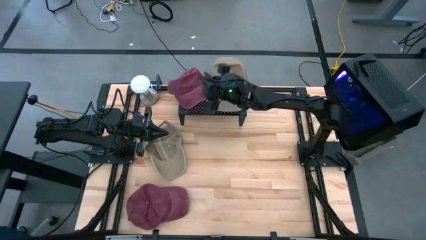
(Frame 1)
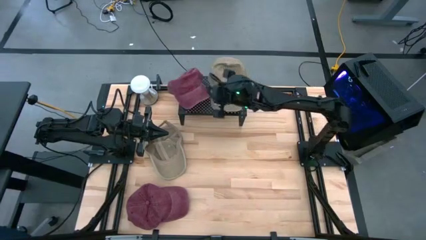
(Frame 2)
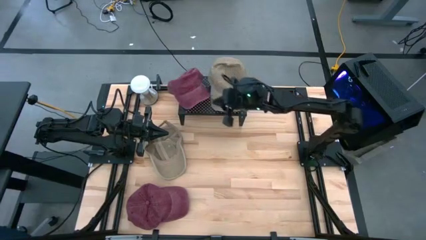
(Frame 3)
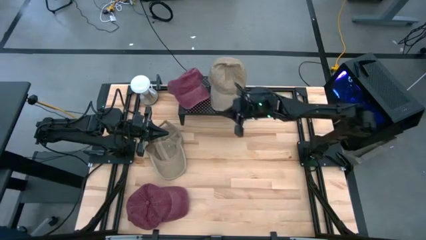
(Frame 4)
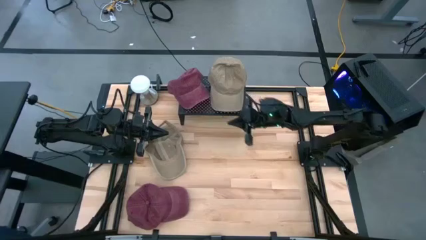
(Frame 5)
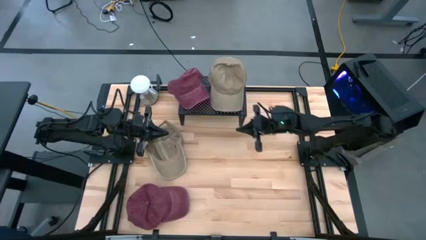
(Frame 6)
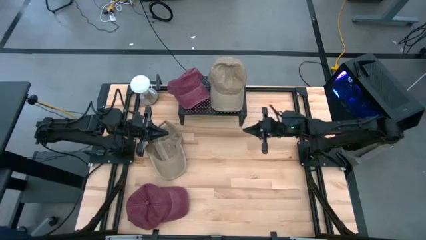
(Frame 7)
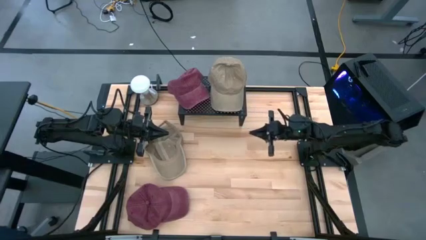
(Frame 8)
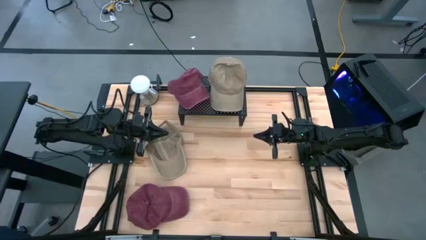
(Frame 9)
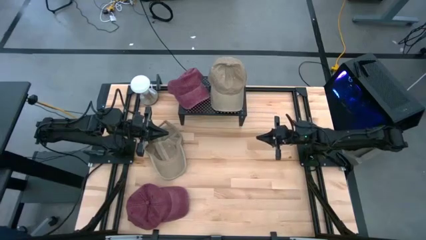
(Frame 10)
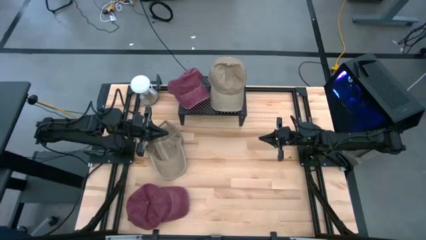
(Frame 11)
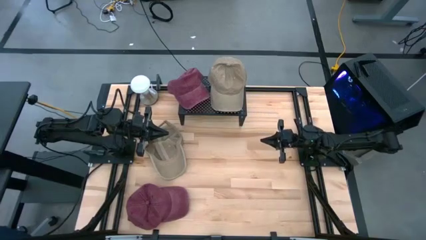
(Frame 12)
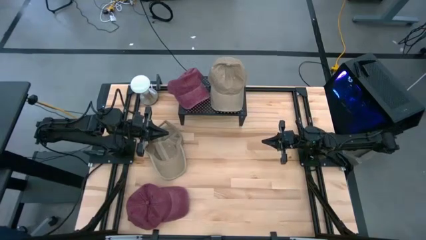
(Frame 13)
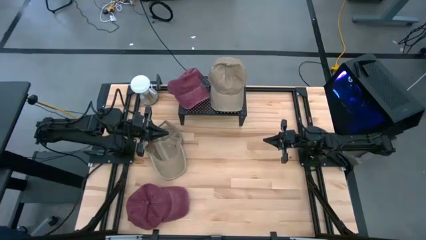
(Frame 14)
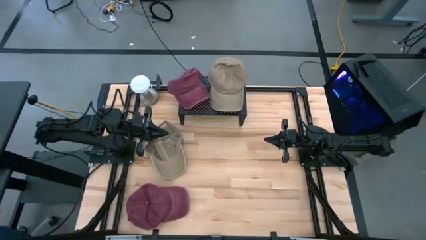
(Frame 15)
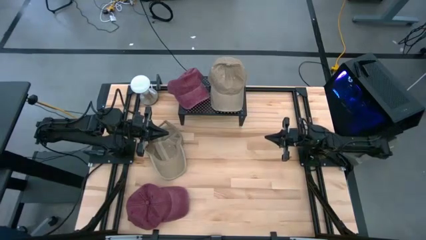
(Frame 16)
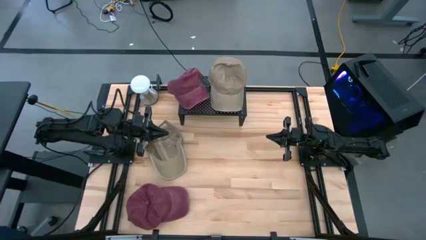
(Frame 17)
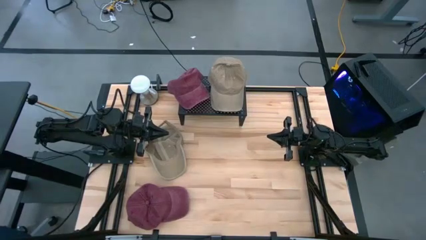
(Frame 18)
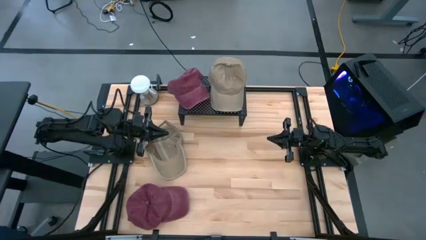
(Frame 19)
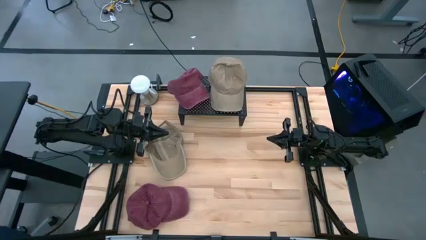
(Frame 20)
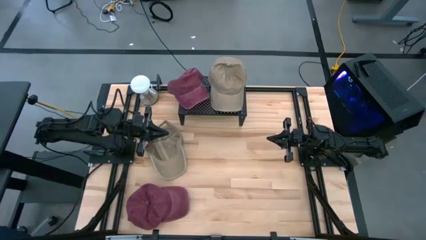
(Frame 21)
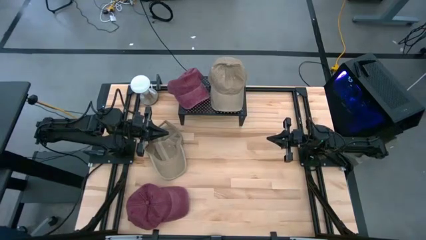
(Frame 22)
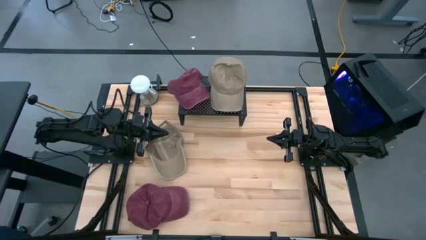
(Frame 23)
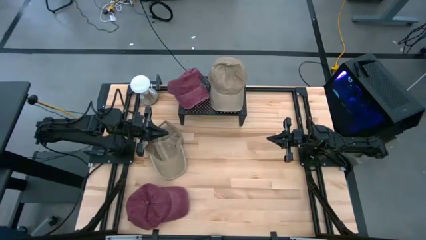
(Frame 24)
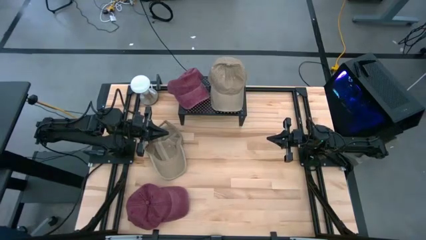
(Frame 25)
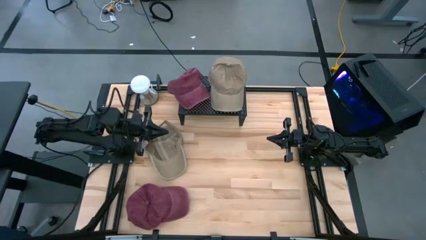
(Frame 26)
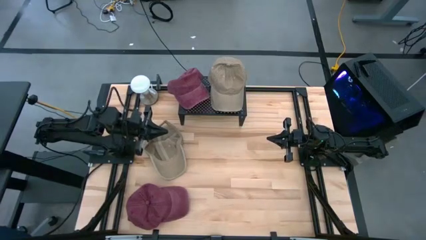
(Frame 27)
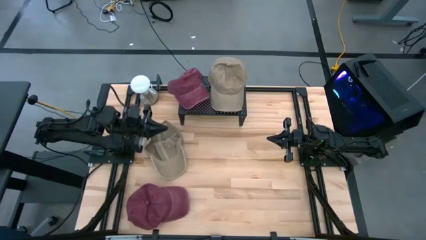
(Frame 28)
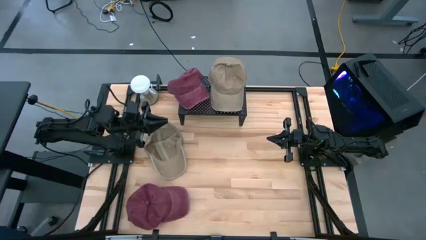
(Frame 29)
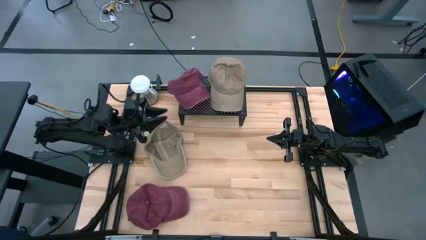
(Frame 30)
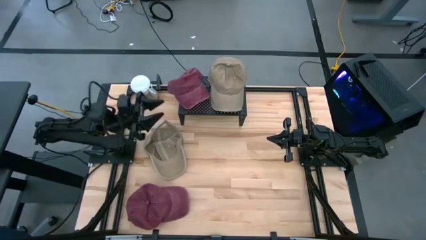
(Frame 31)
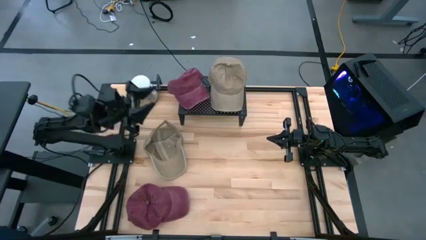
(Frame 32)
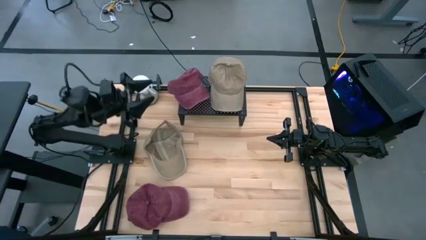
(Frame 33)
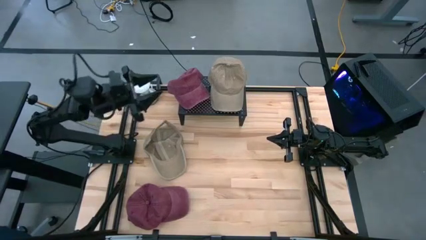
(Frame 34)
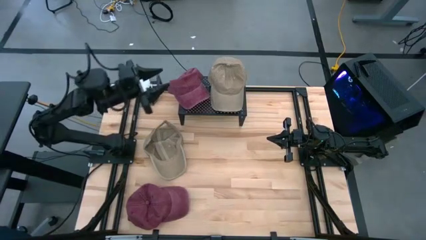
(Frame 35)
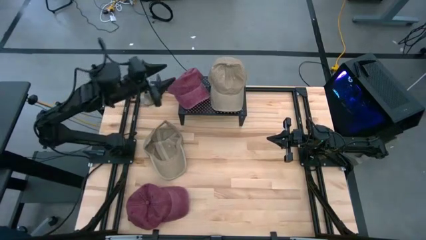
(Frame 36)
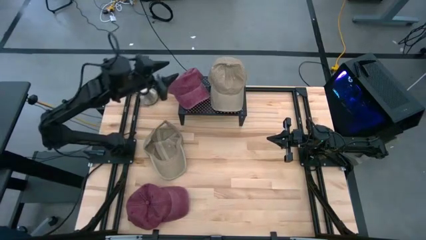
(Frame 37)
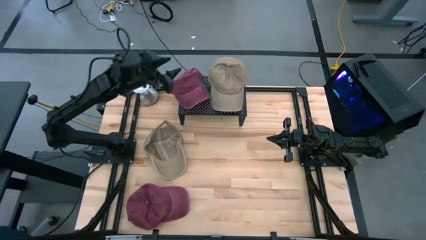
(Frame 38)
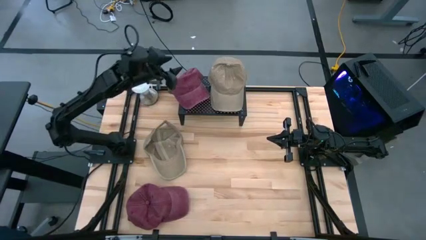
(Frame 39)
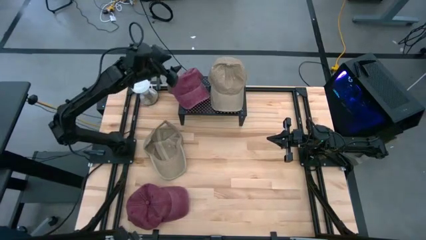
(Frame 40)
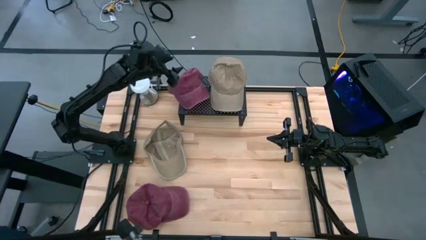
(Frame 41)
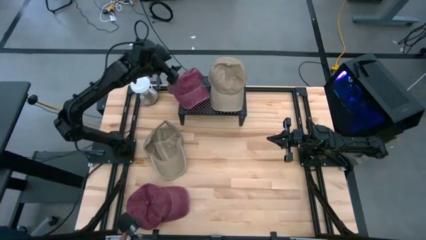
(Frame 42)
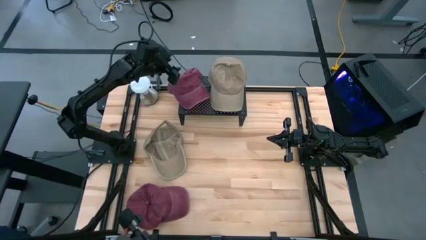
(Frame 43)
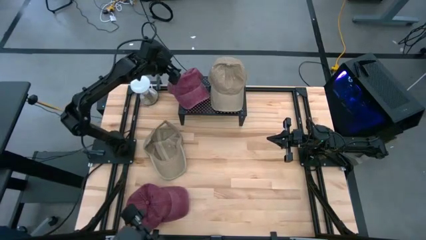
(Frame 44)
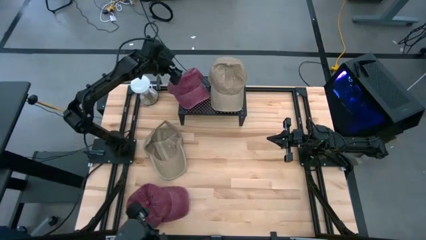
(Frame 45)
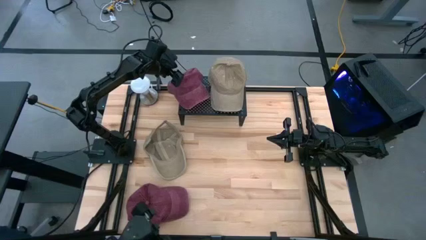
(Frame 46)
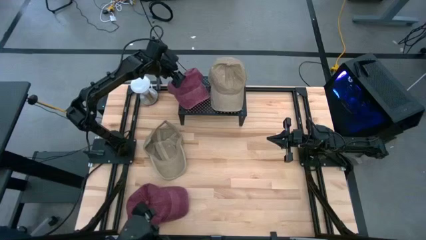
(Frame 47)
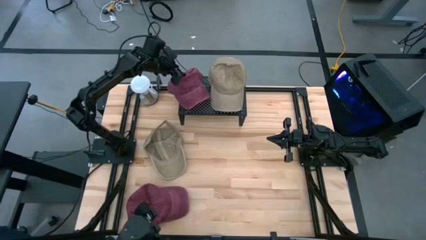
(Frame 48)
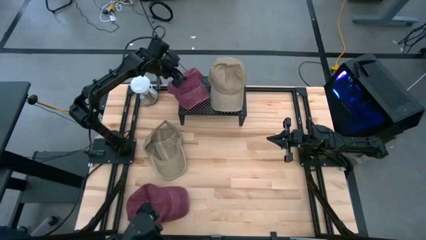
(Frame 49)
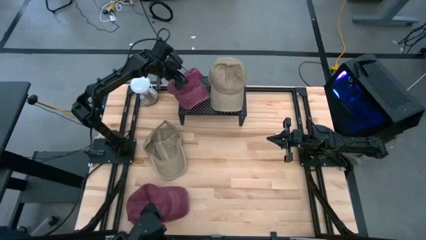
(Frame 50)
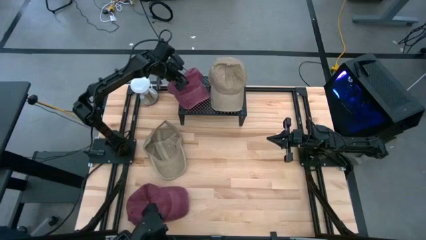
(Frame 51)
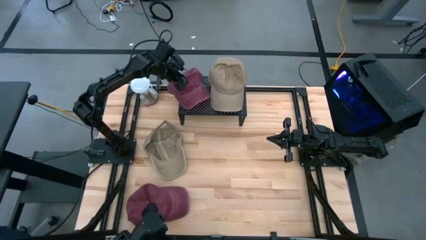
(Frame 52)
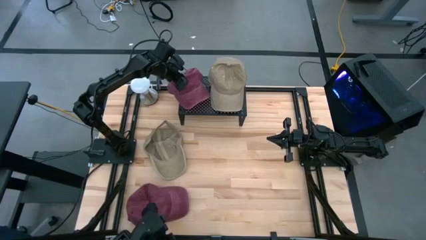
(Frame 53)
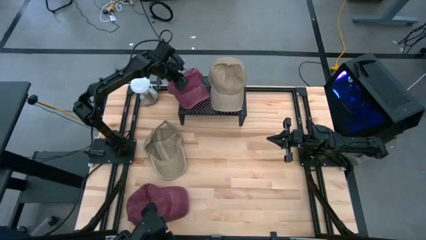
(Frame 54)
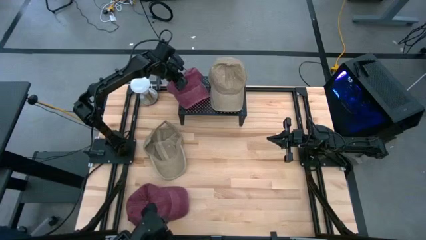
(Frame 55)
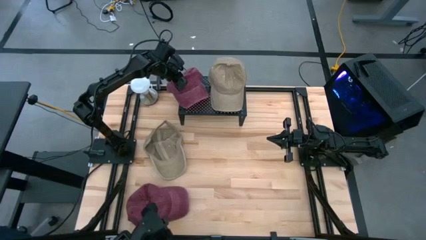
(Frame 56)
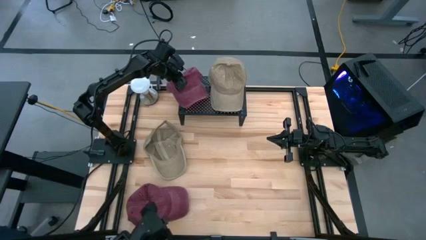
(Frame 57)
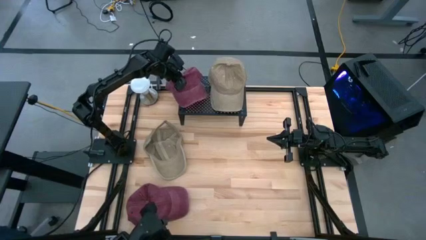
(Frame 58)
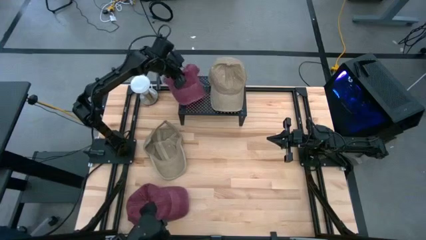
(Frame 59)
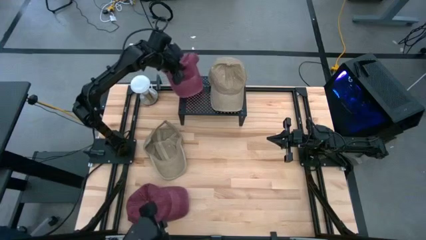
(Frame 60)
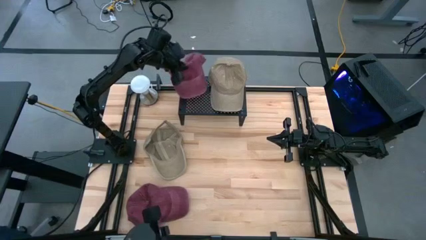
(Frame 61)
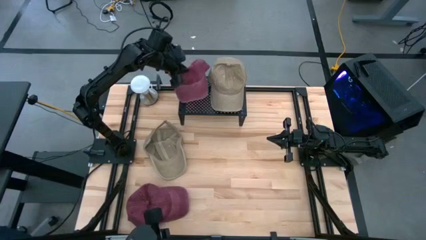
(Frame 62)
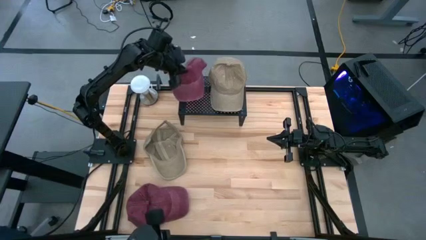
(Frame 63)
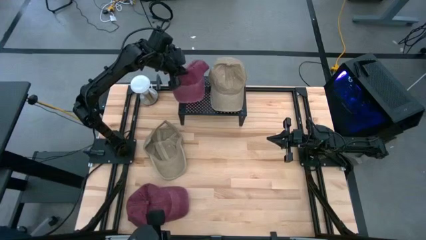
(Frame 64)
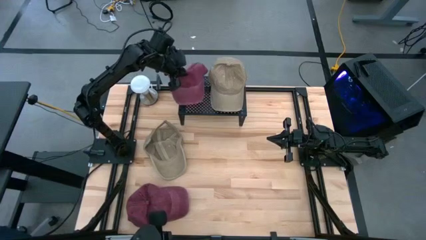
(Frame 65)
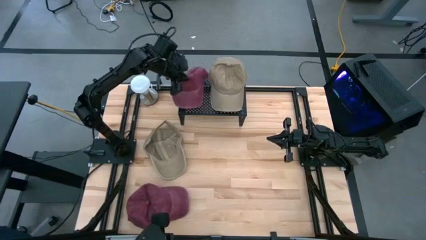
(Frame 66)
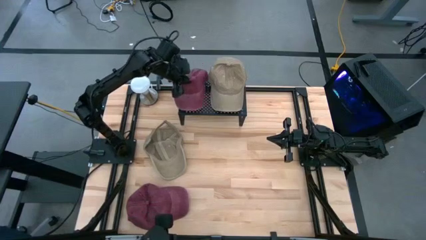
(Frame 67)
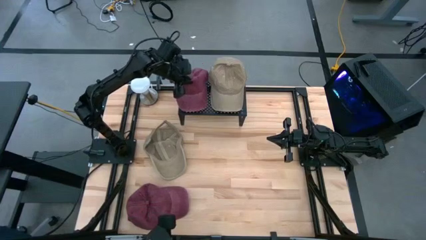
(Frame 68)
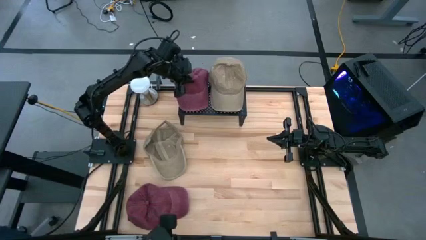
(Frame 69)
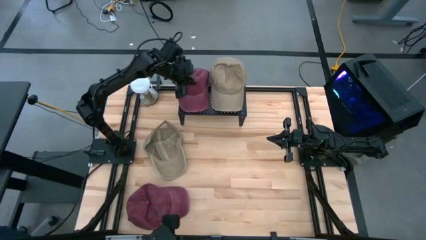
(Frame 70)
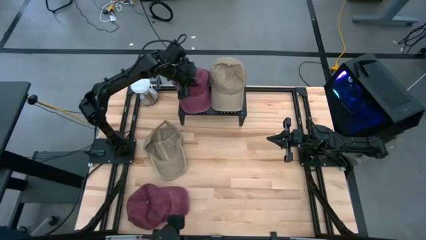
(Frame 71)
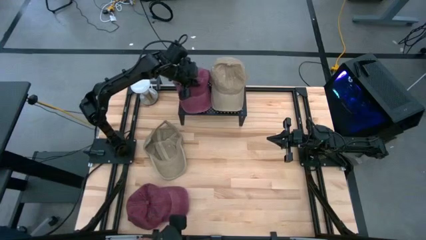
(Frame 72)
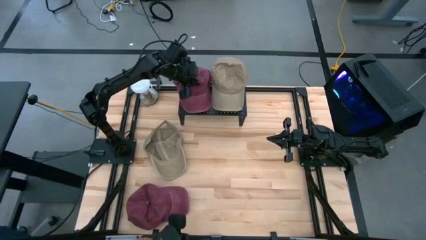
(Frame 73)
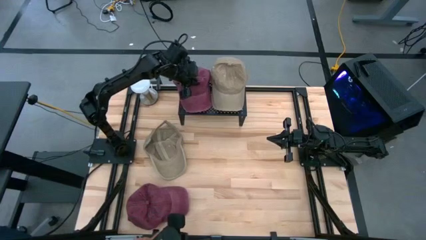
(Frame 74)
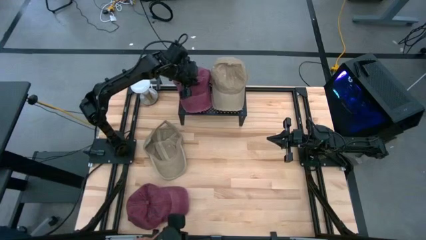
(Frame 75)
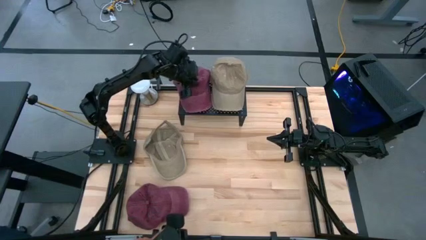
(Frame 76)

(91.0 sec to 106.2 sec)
Task: Pick & Place hat
Put the right red cap on the shelf

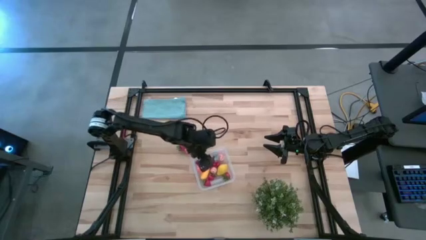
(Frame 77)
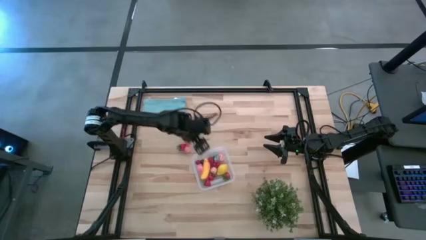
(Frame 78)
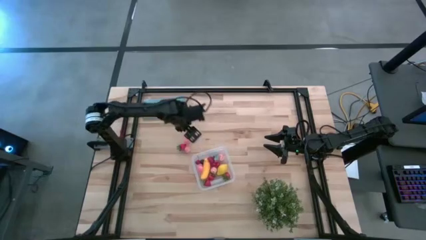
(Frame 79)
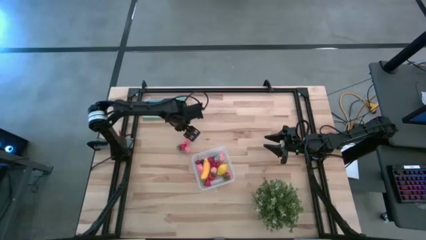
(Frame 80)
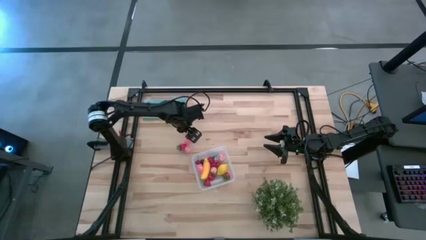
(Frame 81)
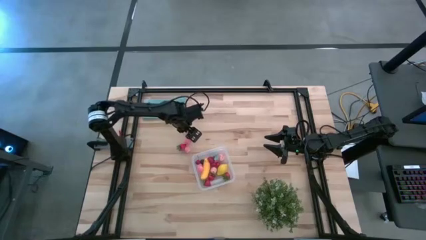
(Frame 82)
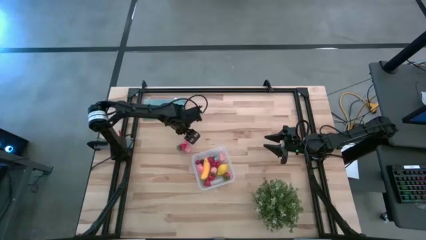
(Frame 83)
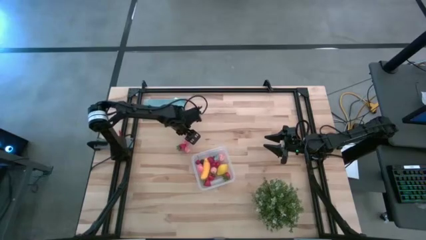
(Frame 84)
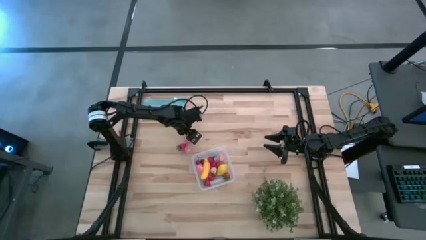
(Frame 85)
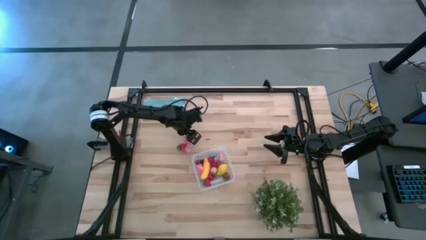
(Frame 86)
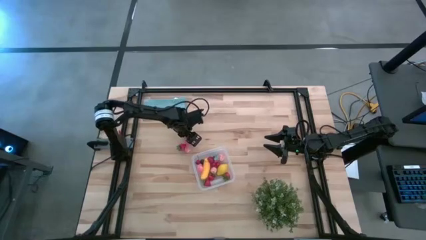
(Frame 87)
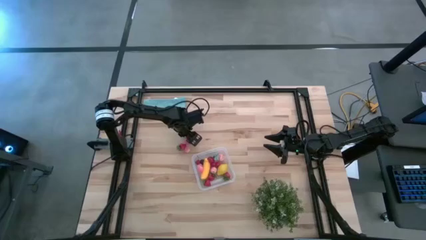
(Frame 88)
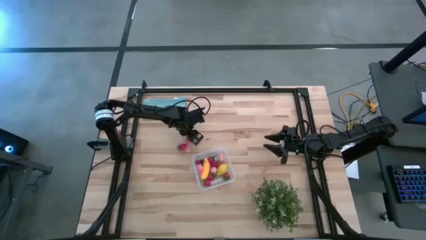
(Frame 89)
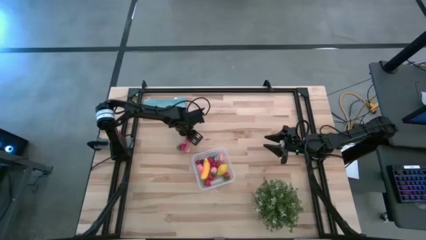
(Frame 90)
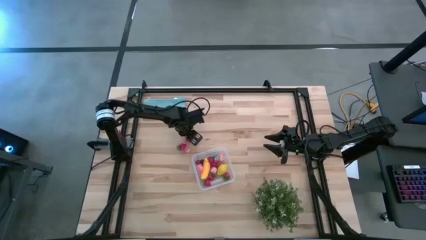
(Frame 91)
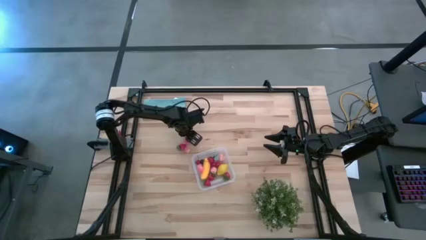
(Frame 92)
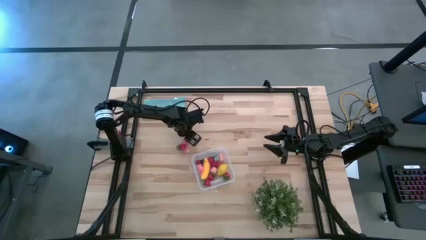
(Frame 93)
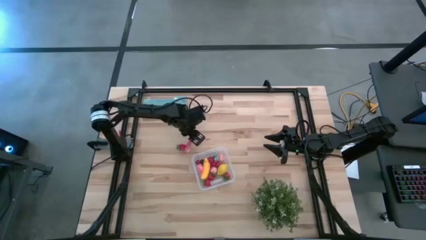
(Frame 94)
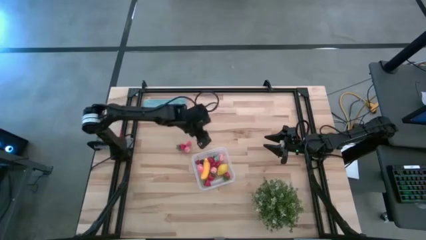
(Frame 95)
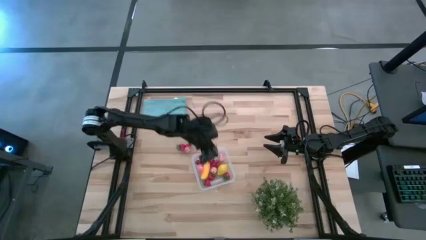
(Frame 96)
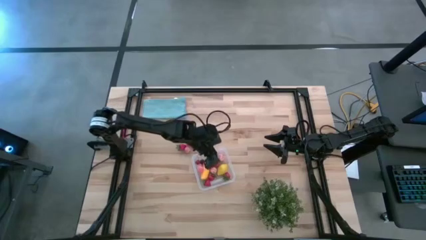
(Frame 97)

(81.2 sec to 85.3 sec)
Task: Pick and placing Produce into tupperware
Put the red strawberry into the transparent bin
